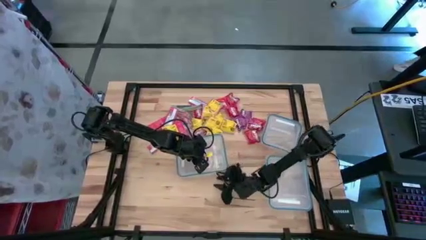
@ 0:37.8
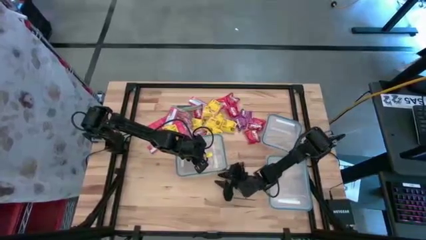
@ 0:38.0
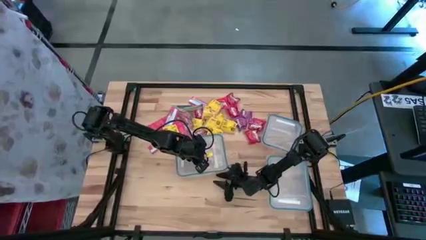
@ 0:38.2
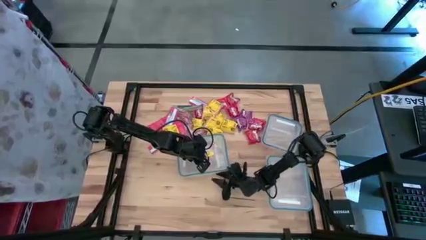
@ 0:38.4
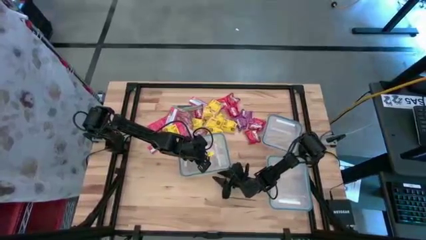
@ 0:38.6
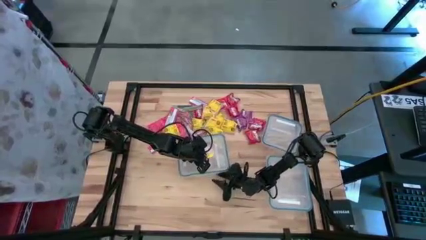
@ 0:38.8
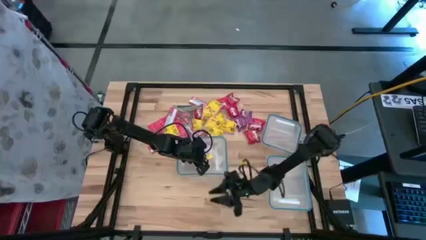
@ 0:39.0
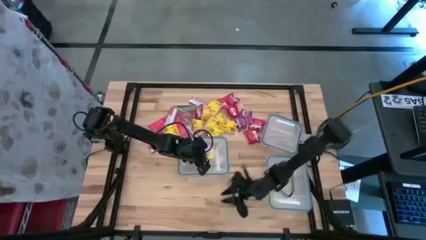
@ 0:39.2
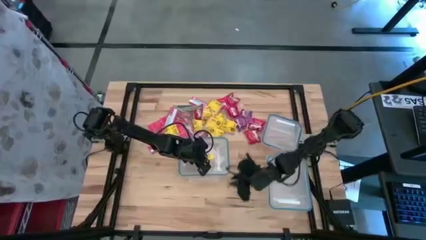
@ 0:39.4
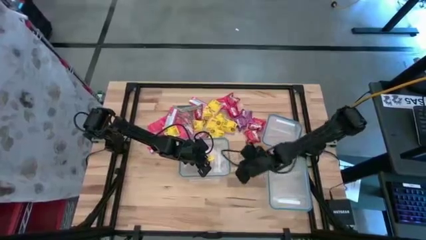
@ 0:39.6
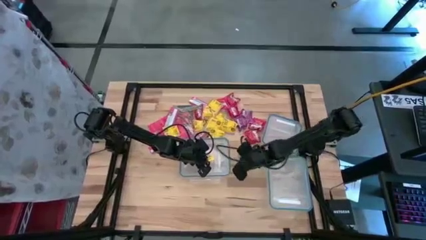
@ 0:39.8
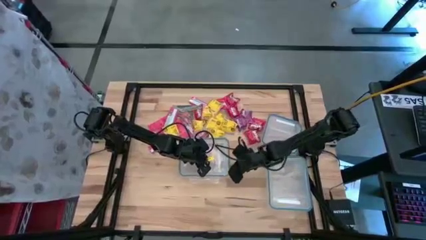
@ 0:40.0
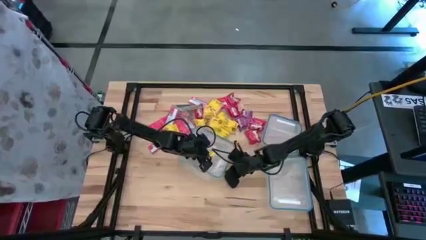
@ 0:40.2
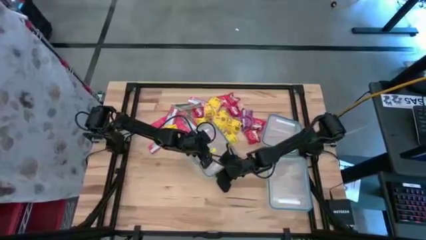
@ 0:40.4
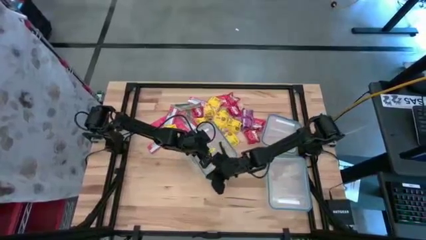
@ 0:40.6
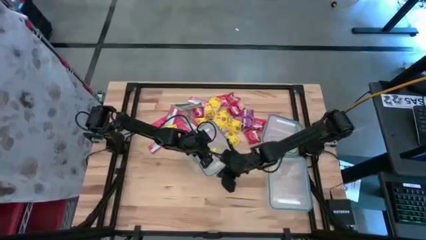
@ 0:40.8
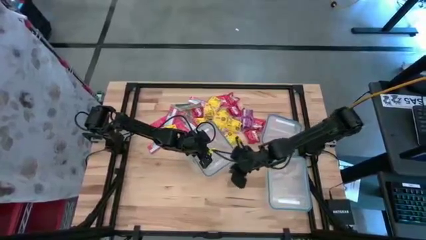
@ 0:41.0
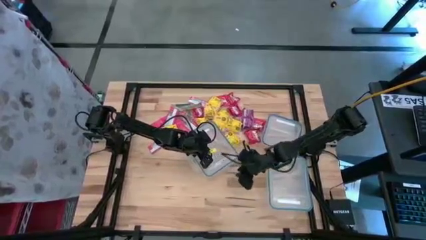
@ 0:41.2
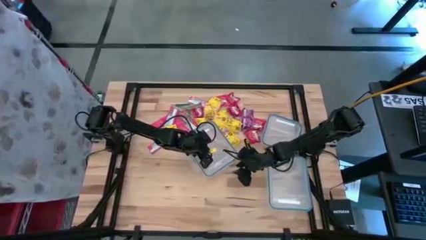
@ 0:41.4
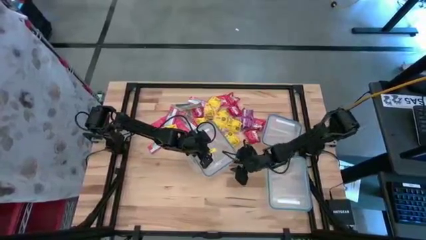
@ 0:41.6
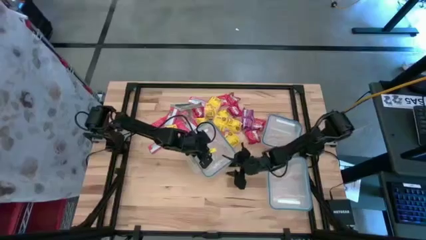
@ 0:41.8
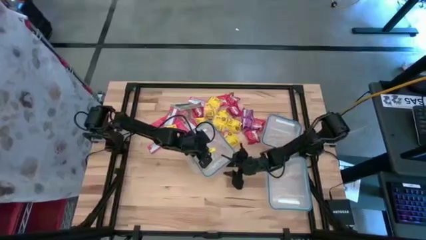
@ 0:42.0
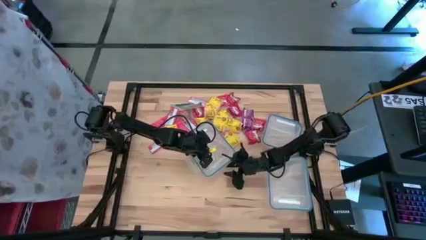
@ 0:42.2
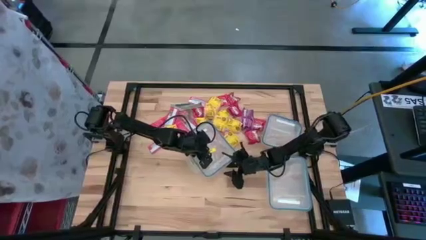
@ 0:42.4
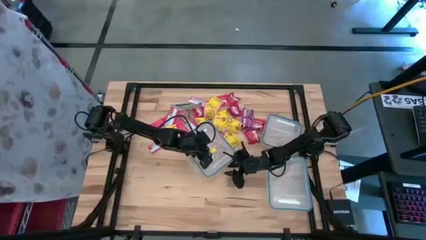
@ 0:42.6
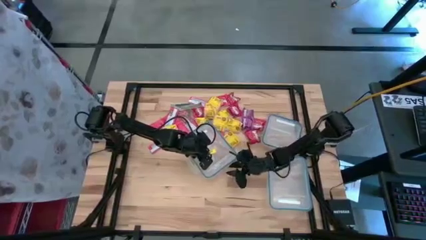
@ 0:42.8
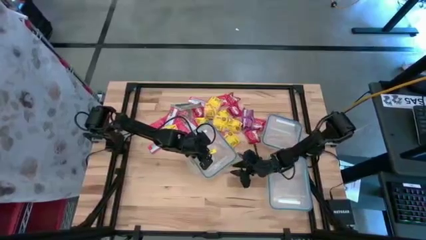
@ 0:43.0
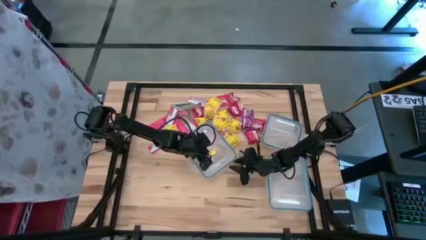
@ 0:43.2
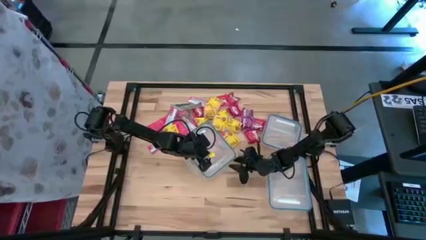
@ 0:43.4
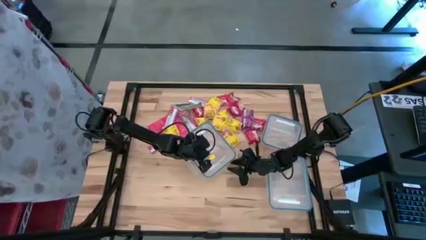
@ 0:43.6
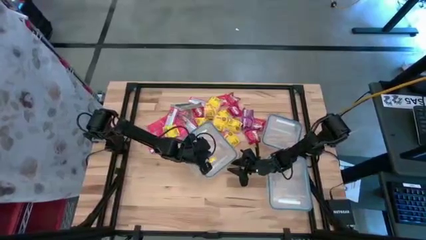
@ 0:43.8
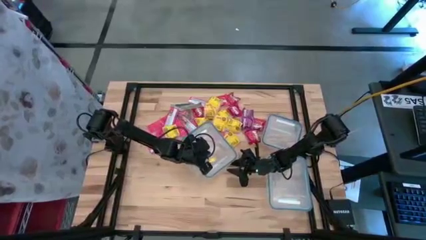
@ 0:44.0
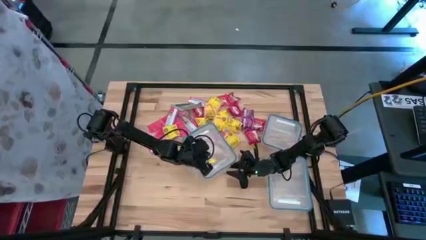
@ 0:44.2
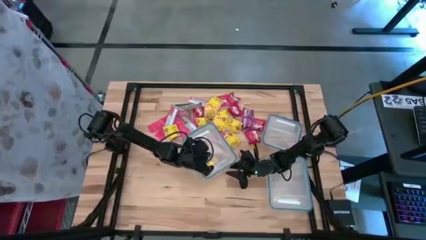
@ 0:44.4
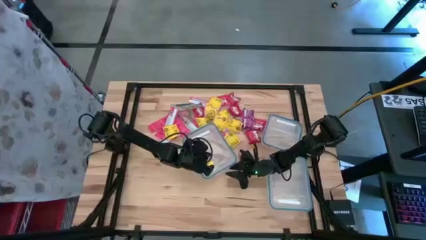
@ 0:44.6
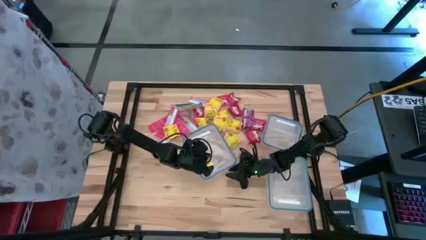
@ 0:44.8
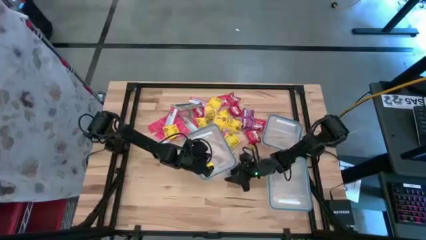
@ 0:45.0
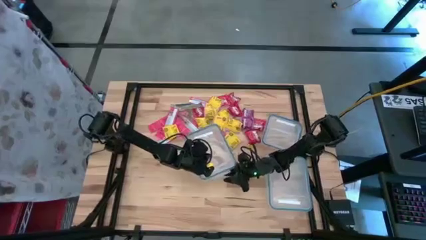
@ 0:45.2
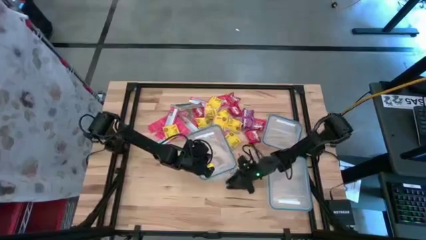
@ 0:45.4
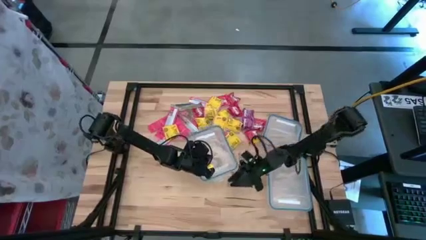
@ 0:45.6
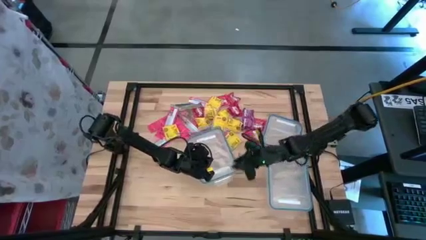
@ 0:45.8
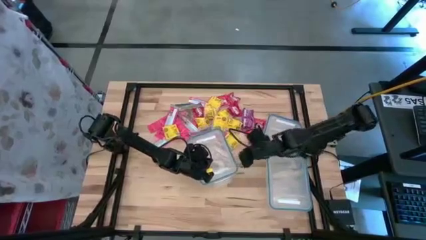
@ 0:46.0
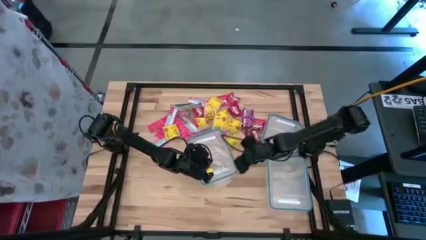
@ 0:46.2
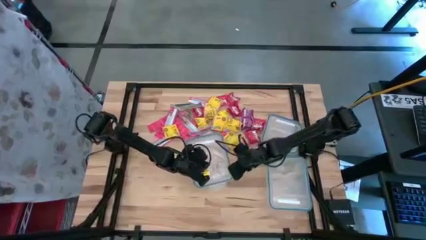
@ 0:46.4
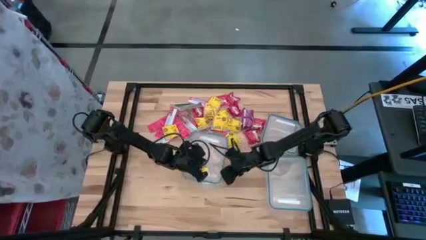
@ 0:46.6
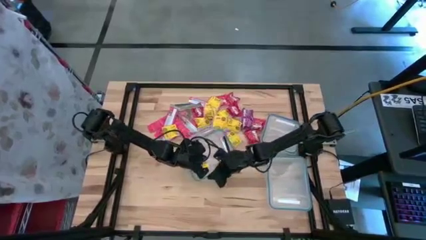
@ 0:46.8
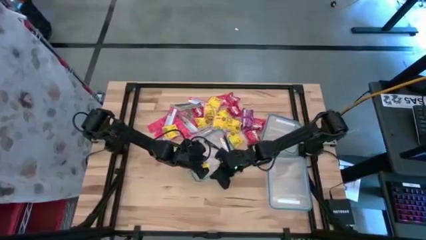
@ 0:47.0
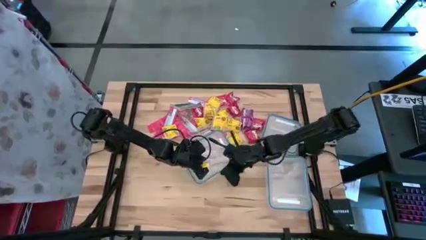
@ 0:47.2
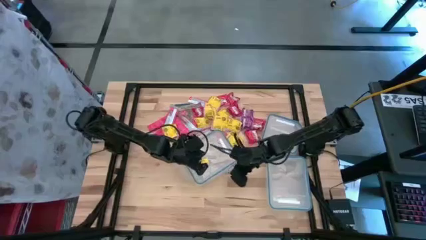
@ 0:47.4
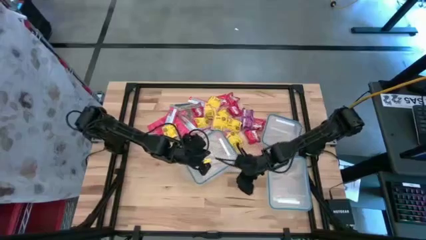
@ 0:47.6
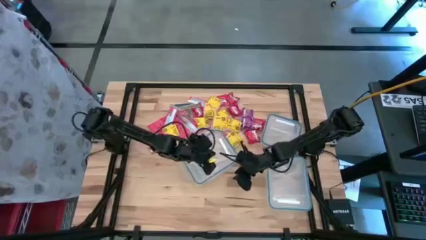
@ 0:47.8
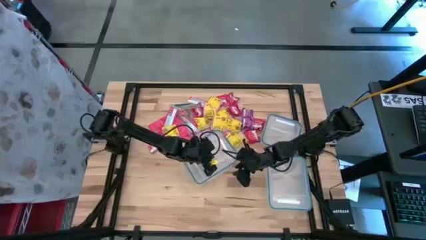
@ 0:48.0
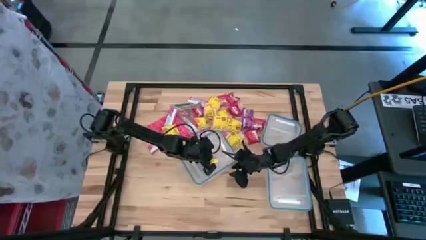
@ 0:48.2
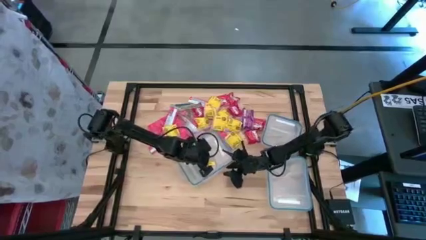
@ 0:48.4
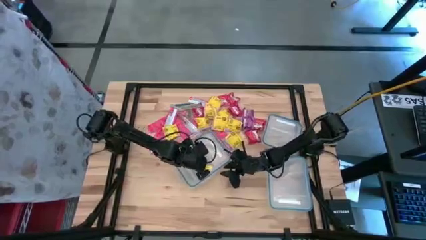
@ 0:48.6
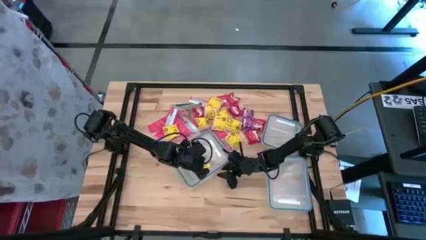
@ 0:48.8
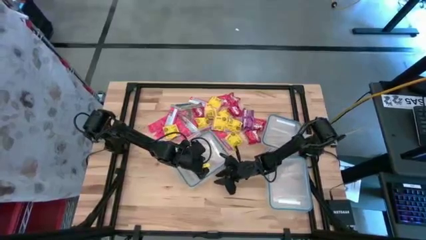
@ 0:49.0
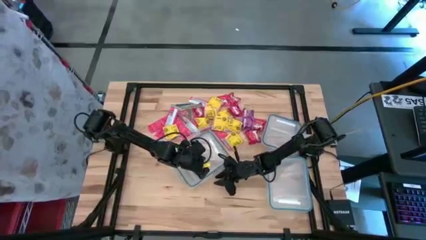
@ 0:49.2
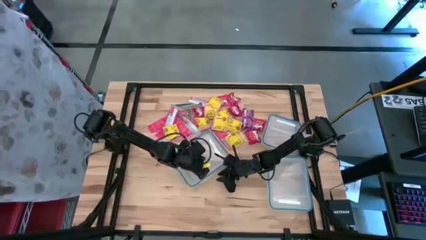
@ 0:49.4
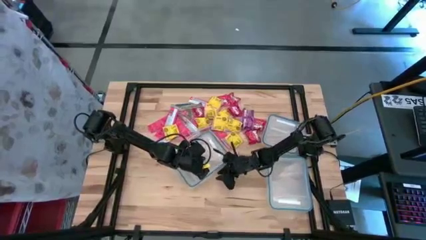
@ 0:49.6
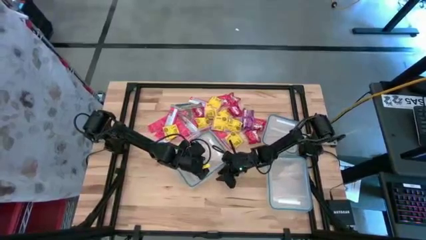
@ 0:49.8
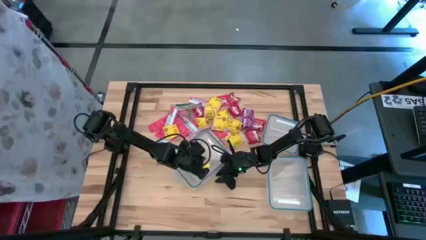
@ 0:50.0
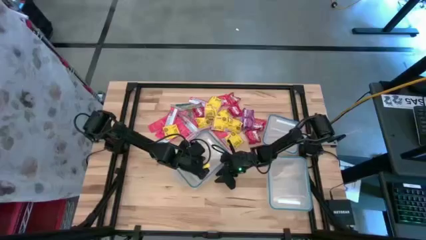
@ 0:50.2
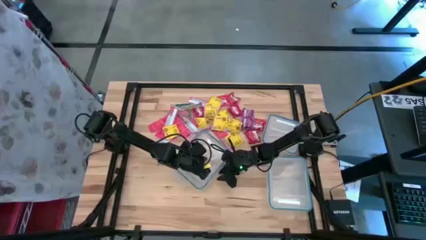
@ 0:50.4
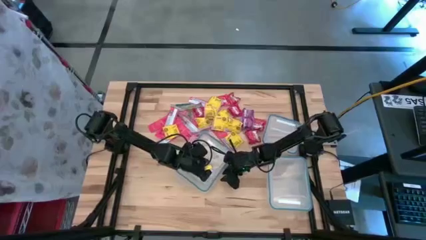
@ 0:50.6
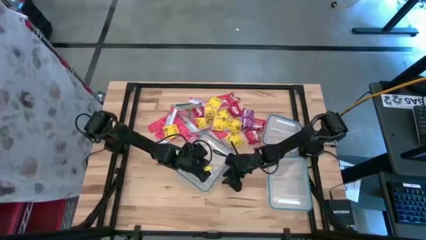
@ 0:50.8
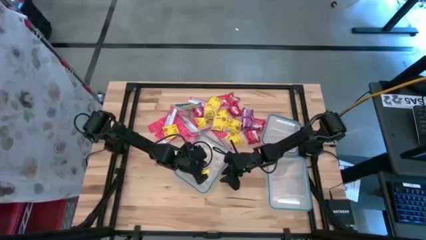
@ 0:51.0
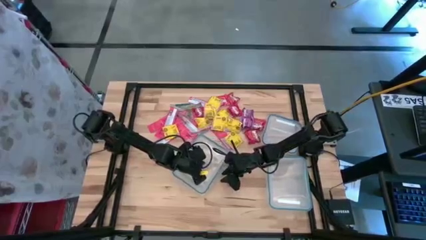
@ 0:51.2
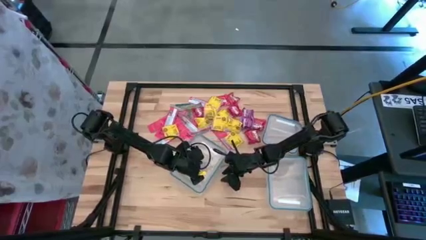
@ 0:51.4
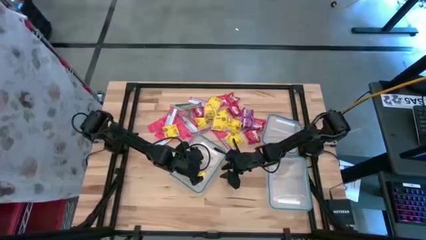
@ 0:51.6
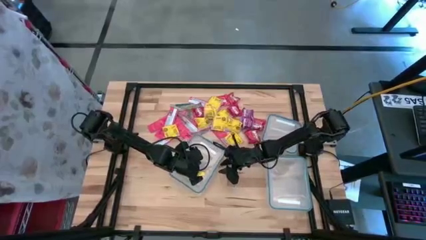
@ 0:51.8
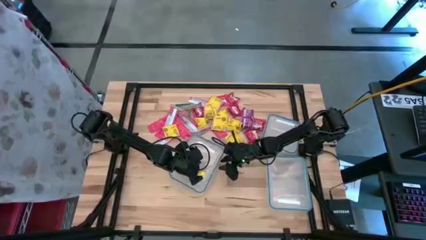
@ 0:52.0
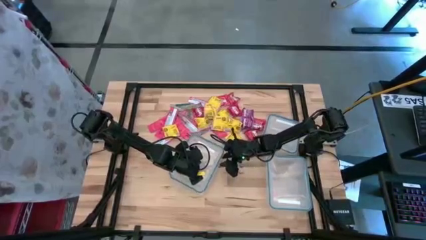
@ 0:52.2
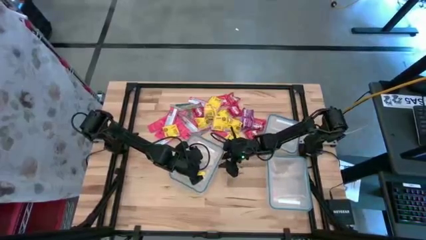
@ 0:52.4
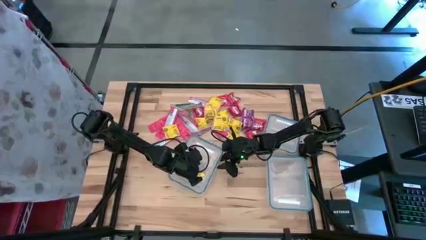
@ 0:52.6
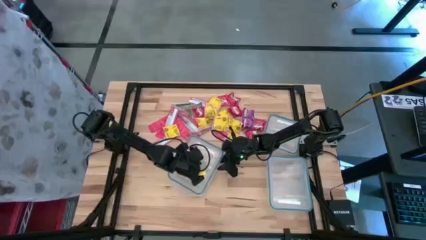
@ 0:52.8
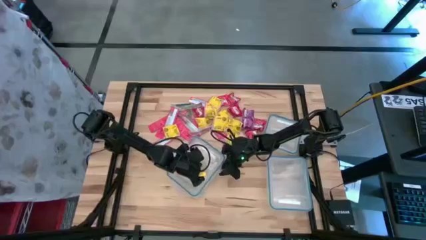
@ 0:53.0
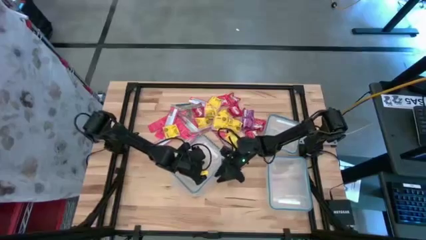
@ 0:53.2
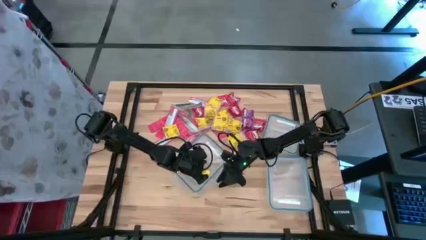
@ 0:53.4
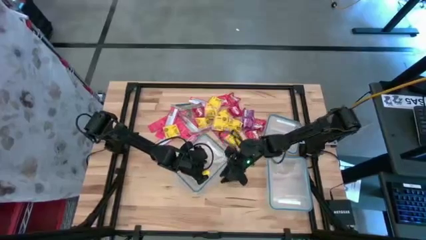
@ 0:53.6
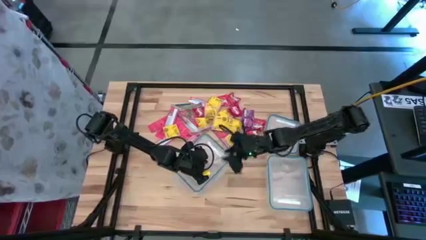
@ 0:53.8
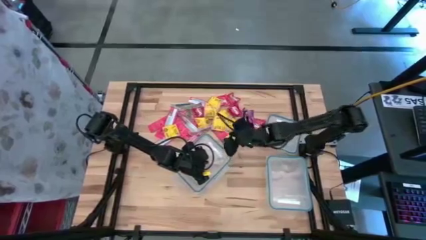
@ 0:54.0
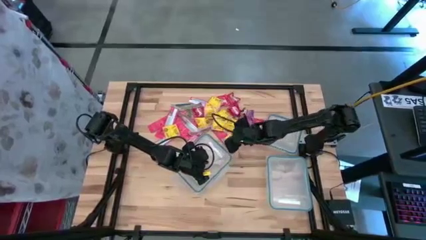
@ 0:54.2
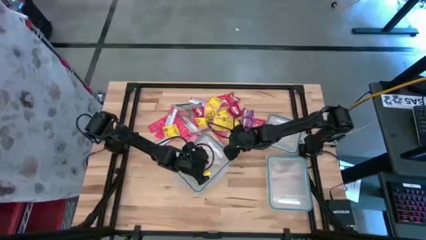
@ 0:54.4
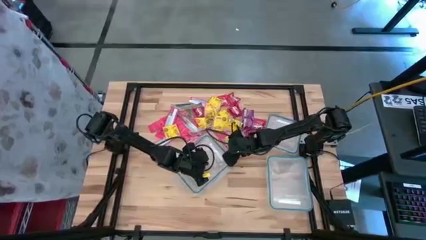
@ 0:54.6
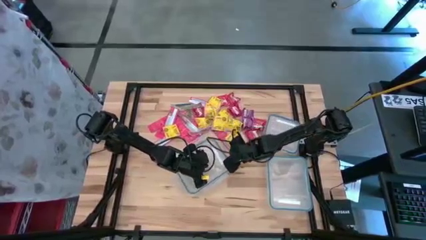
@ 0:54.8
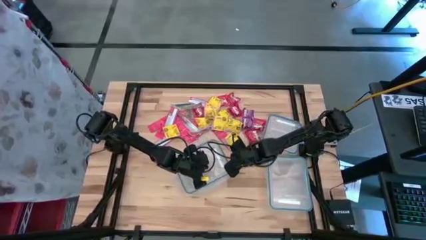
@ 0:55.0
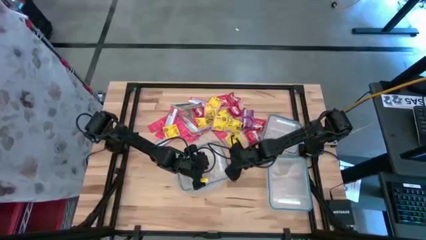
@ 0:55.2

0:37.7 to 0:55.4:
Task: Sort candy
Open the rectangular transparent bin
